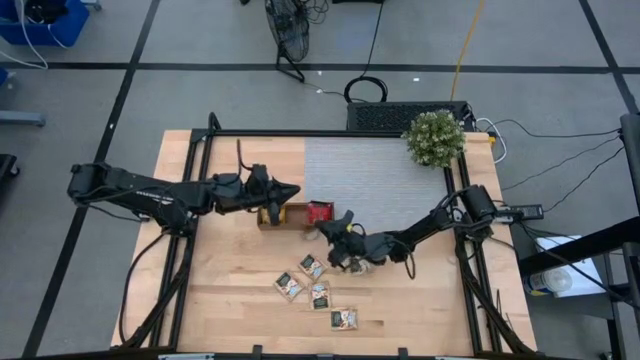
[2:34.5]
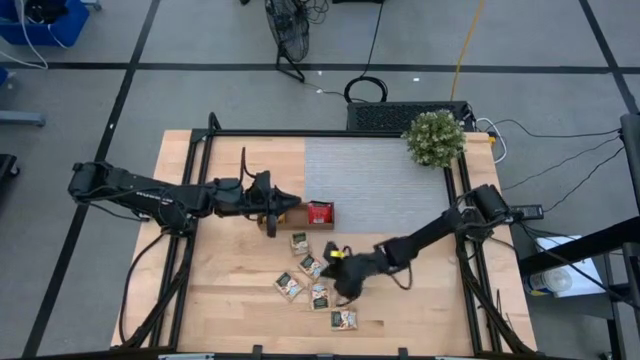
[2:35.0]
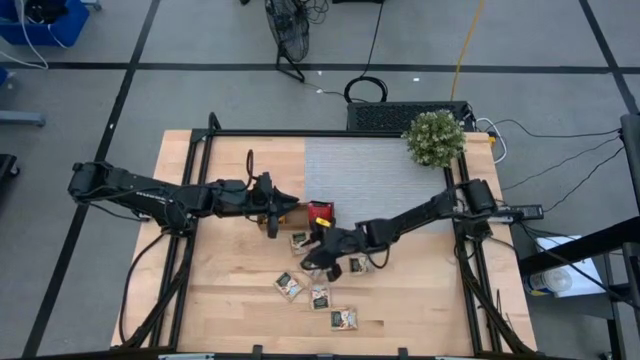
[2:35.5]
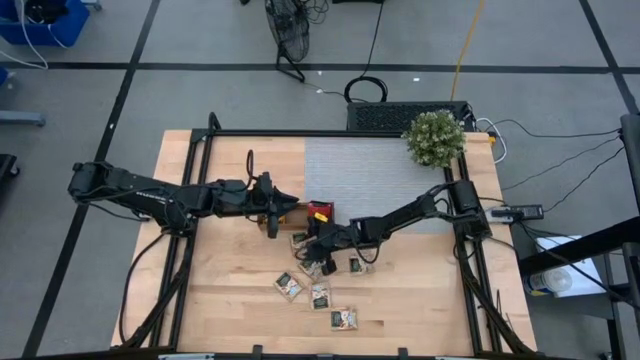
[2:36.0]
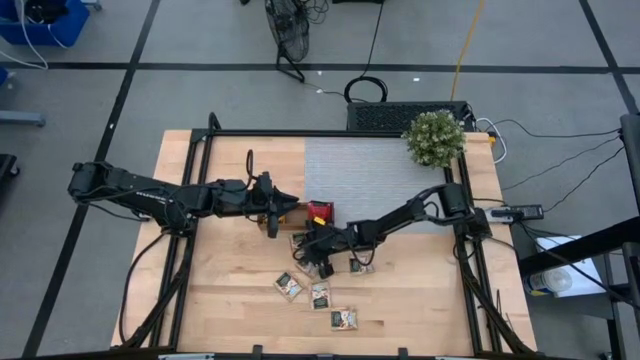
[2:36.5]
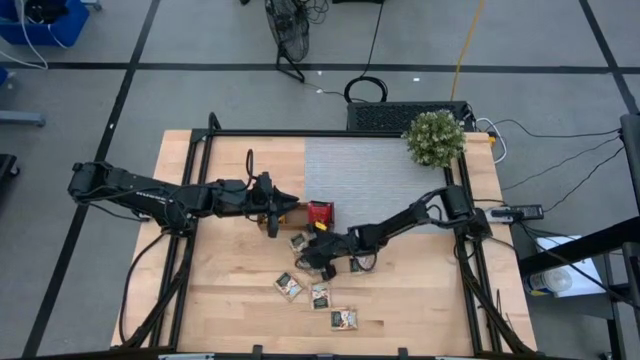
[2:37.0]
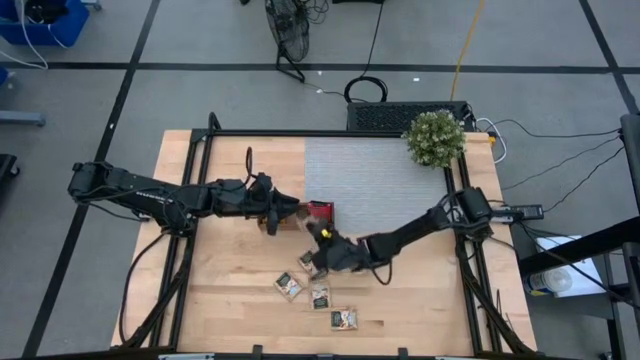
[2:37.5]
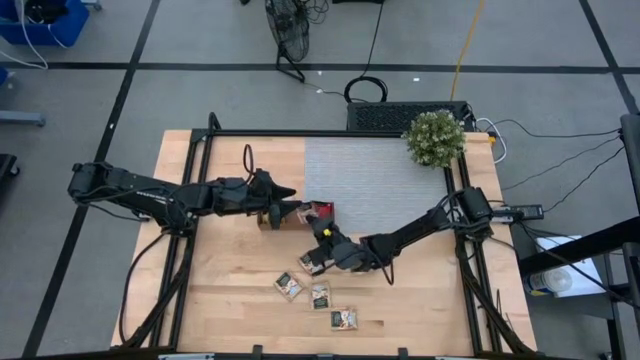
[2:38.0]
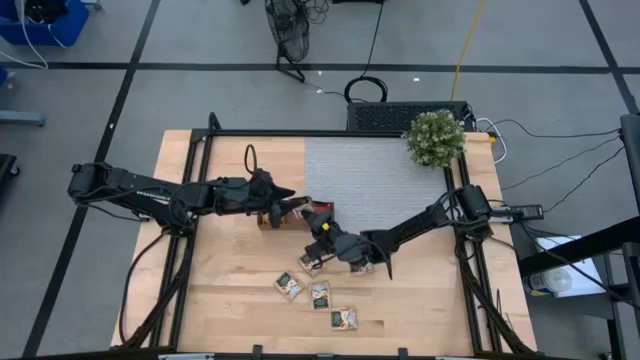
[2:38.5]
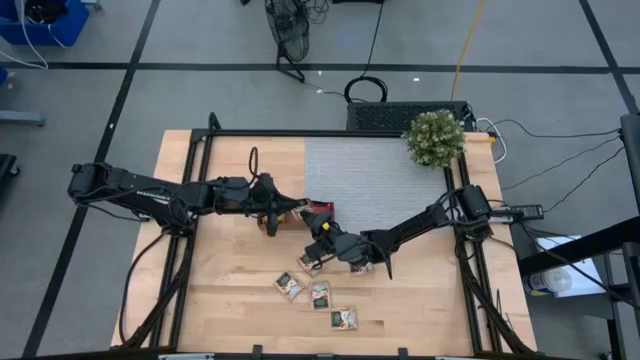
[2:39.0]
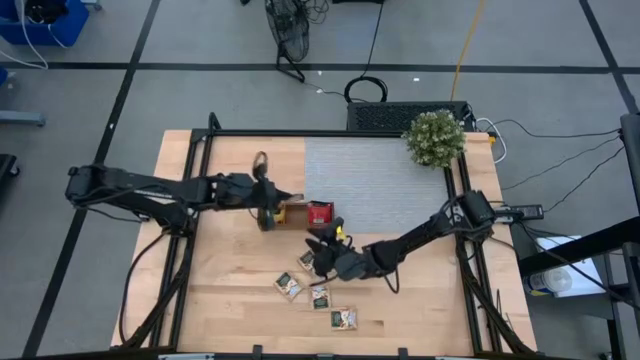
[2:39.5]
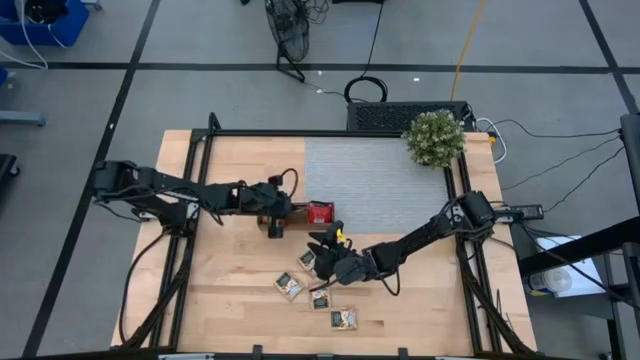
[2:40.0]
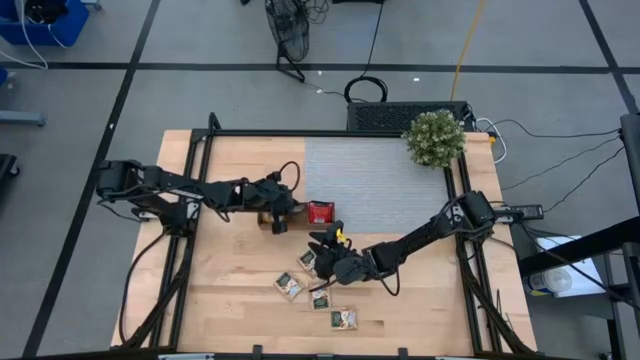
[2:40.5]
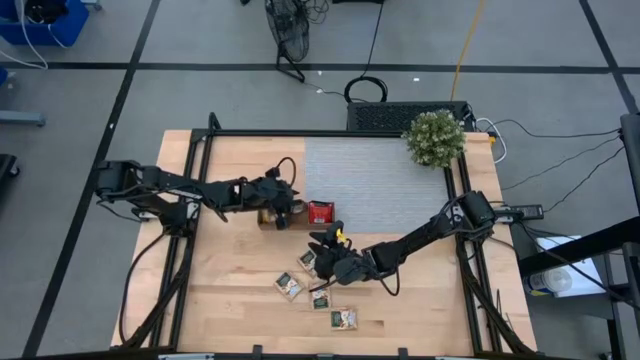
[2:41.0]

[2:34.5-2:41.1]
Task: Pick & Place Tea
Put the brown tea bag into the middle section of the wooden organizer

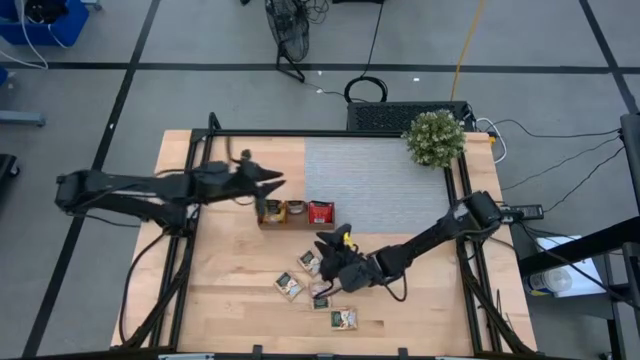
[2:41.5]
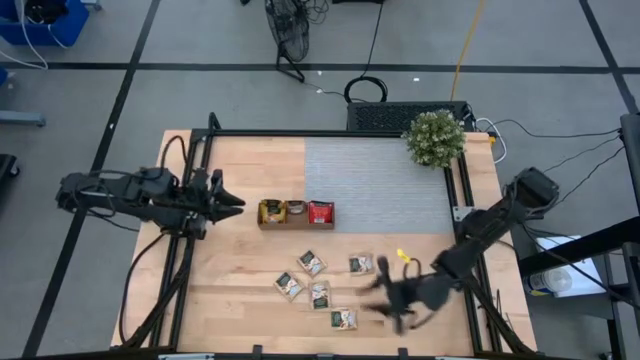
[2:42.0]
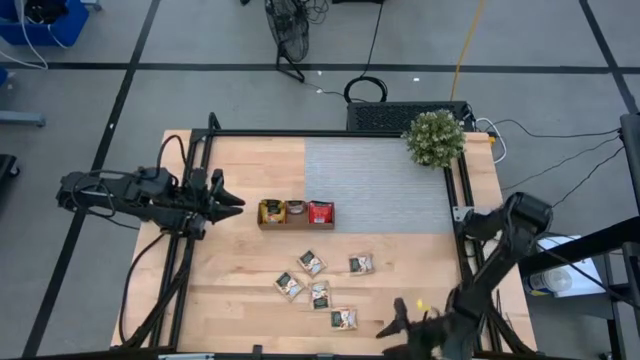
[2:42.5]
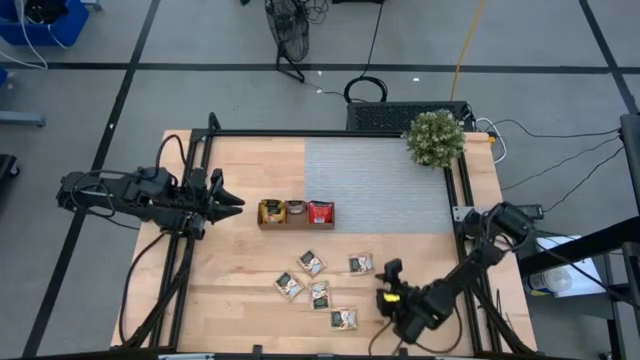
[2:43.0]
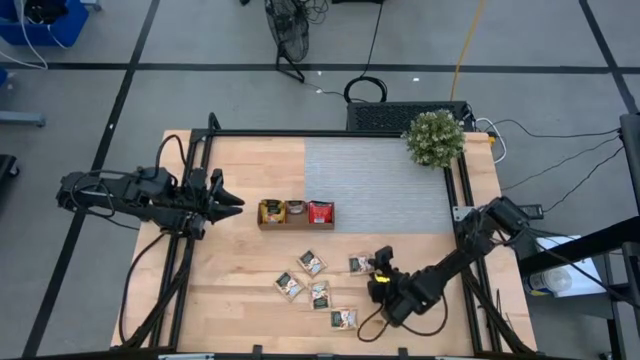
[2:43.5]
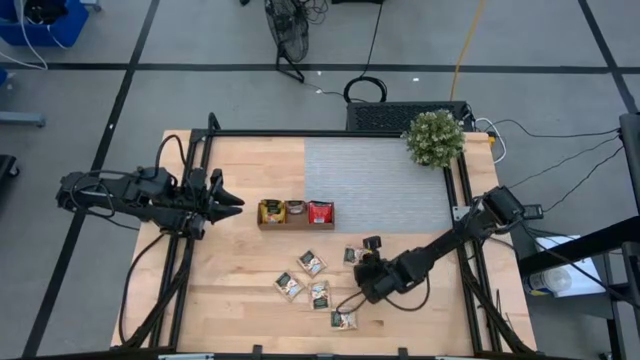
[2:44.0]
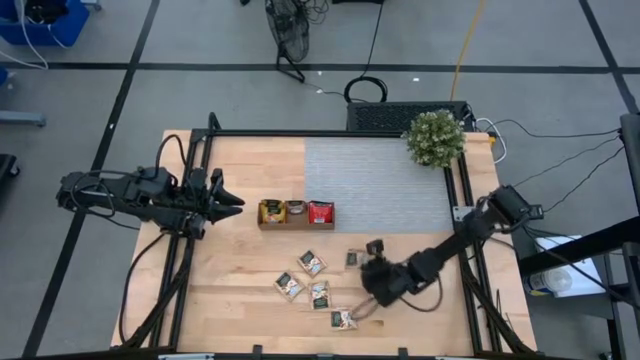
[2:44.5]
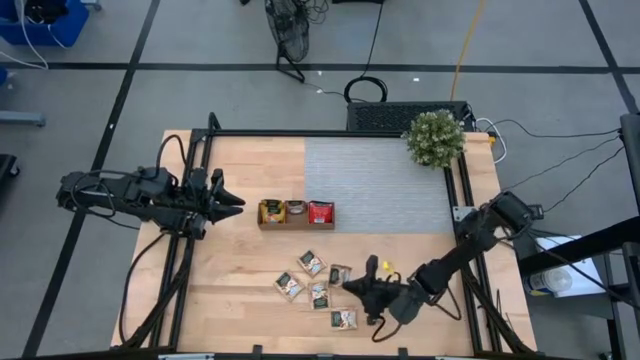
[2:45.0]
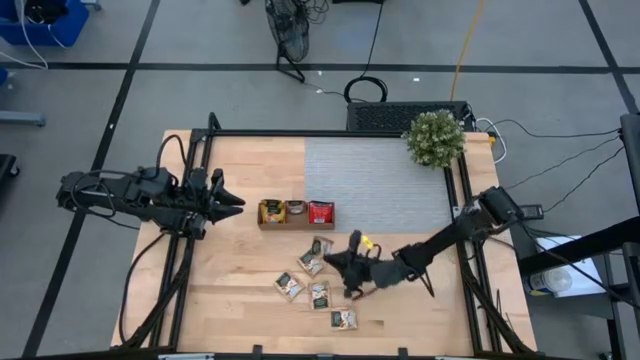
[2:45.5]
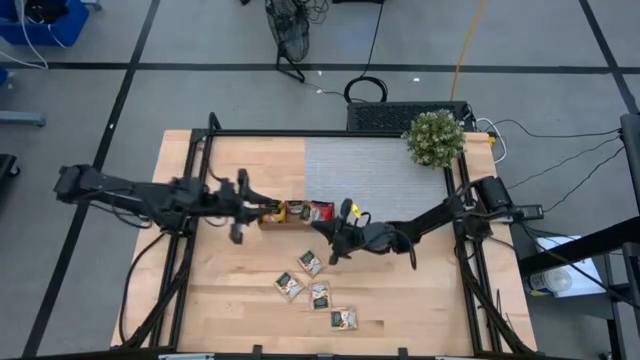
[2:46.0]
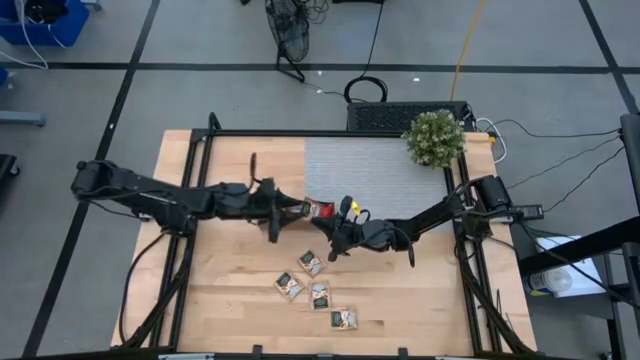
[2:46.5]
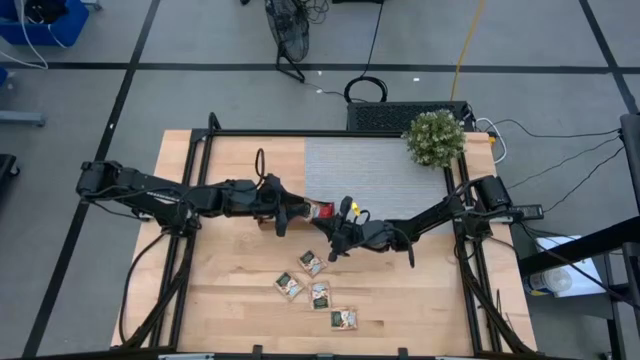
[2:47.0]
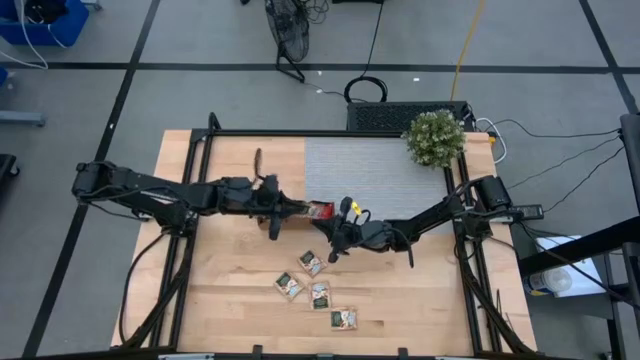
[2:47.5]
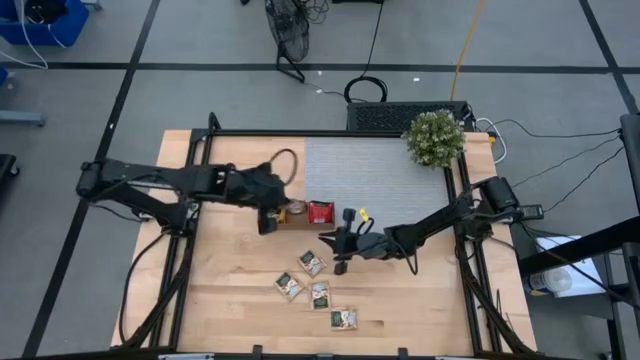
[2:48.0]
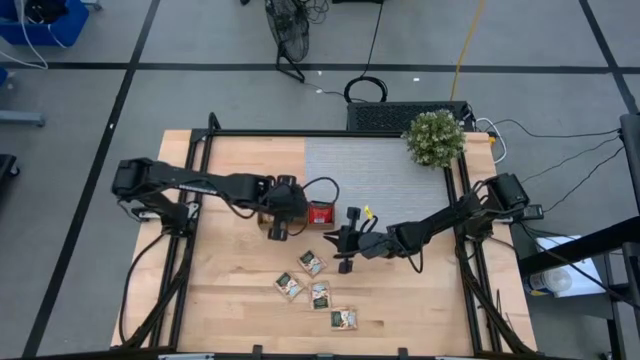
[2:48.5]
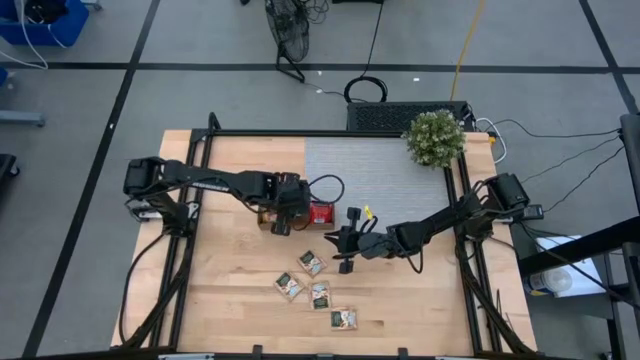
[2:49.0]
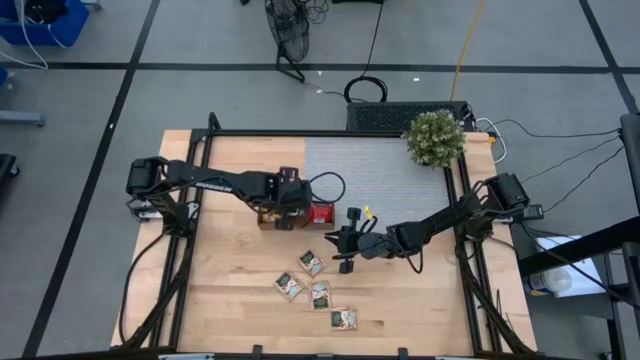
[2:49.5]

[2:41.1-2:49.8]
Put the brown tea bag into the middle section of the wooden organizer

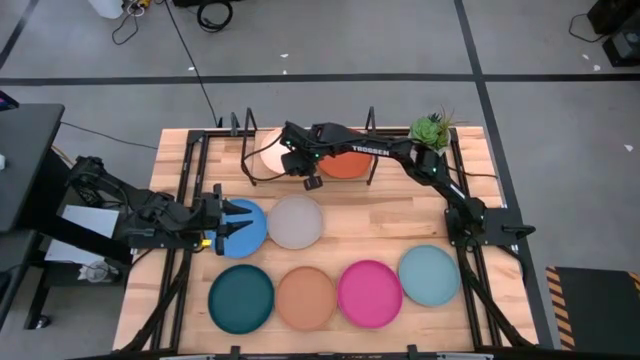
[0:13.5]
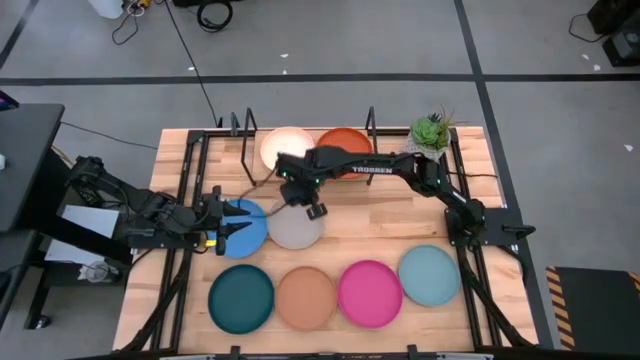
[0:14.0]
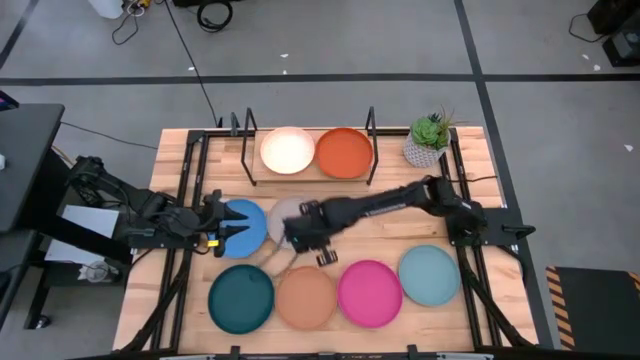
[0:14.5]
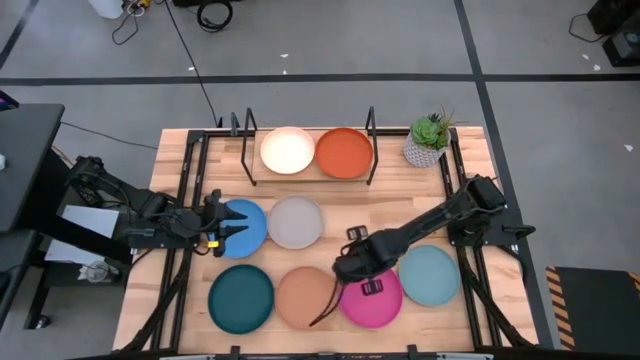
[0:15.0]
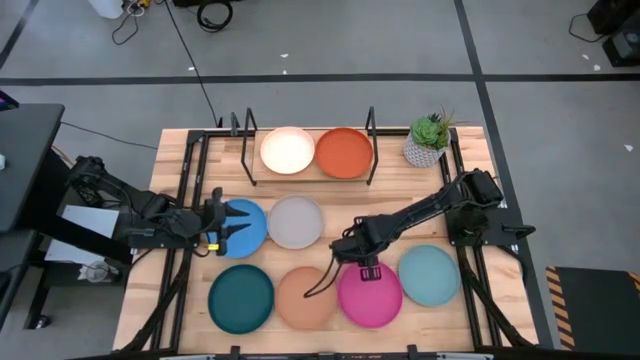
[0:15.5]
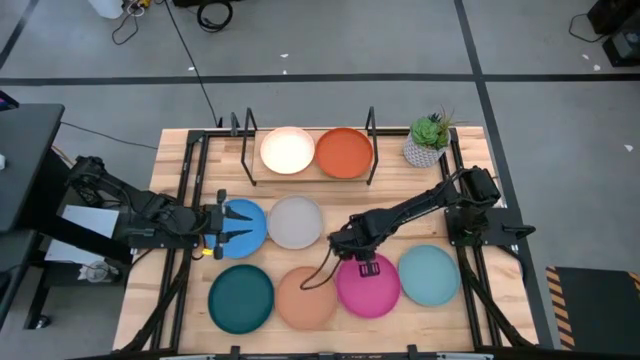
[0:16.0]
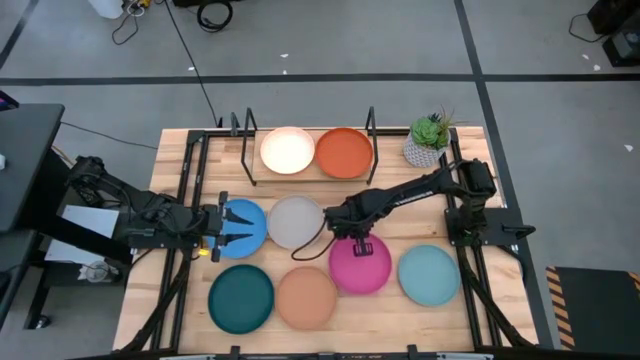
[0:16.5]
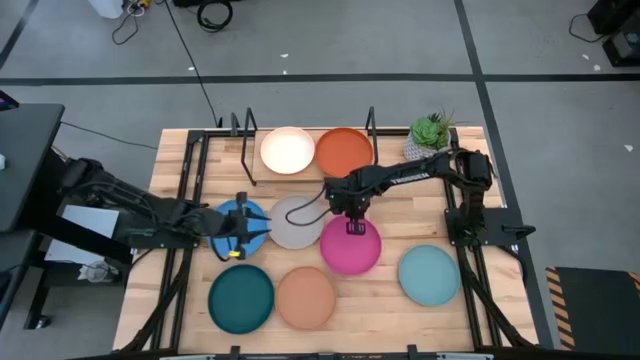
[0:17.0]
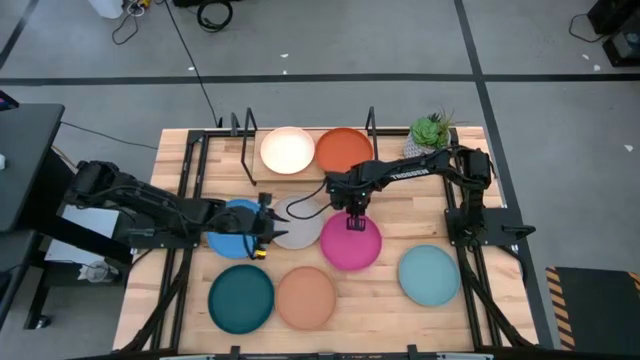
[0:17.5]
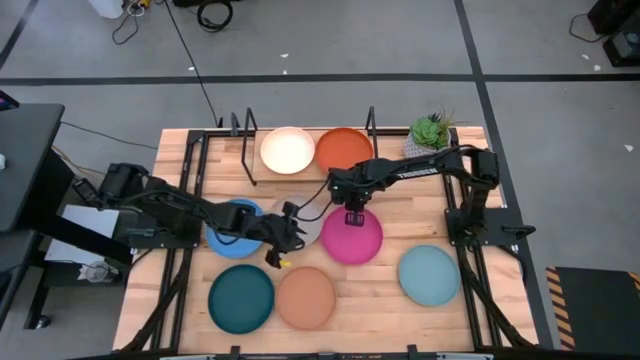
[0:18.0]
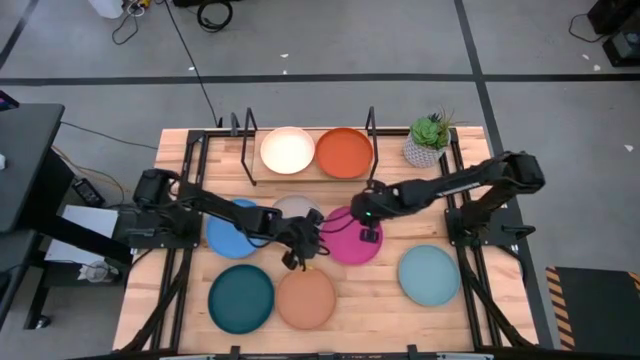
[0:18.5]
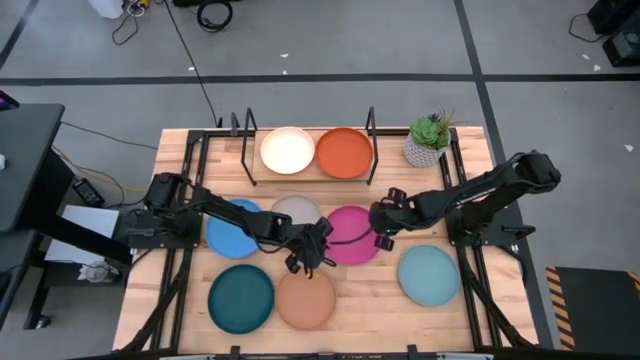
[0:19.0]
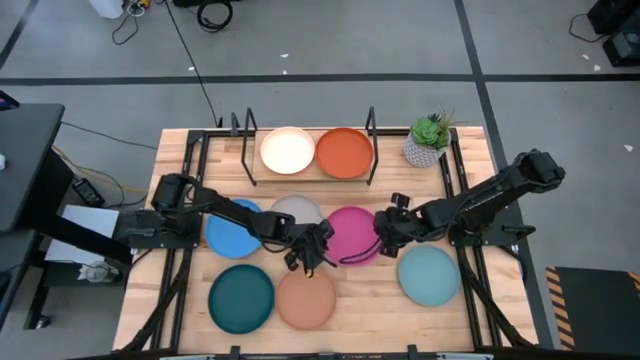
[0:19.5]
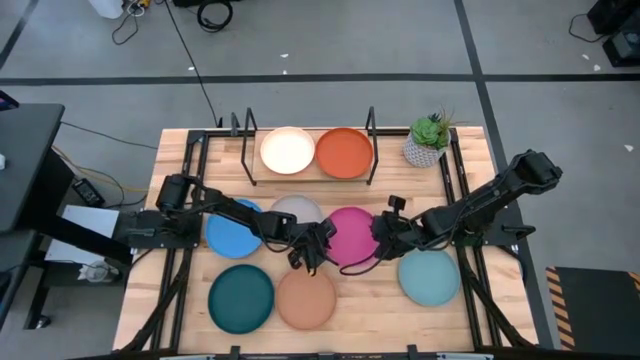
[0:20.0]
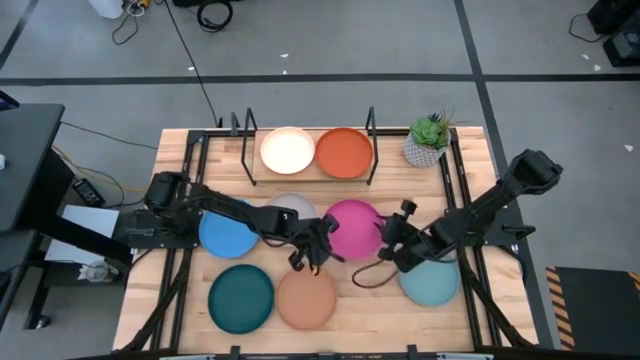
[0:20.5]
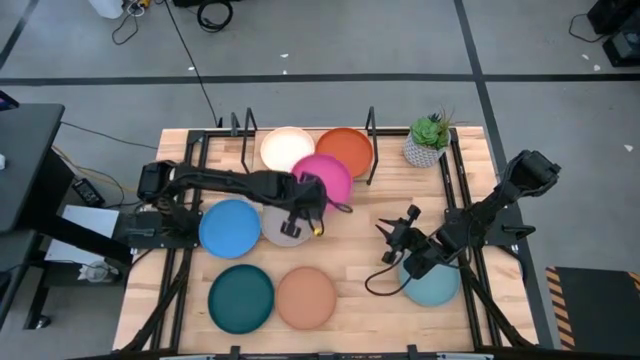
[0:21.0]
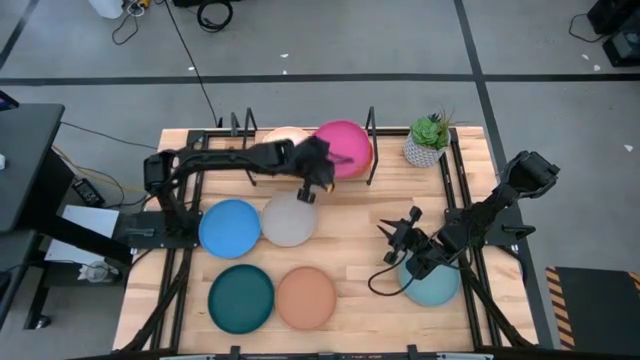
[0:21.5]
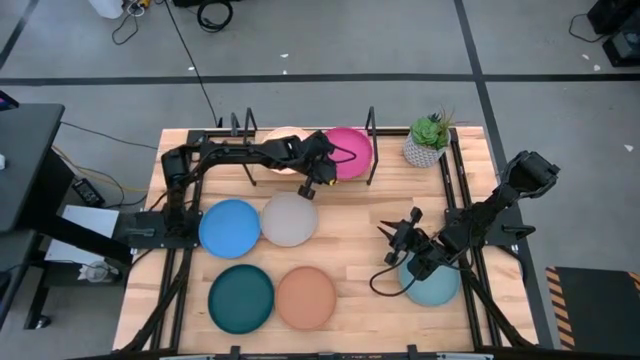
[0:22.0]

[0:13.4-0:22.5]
Task: Place and stack plates onto a shelf
Stack the pink plate on top of the orange plate on the shelf
